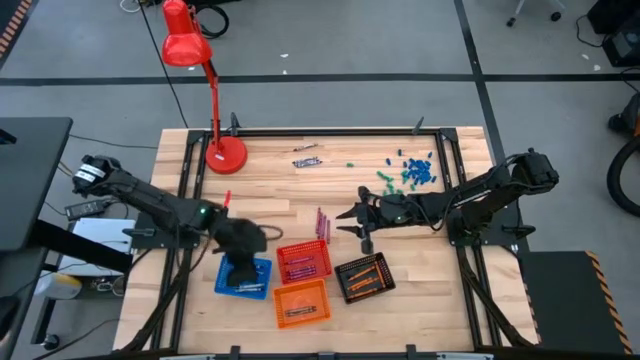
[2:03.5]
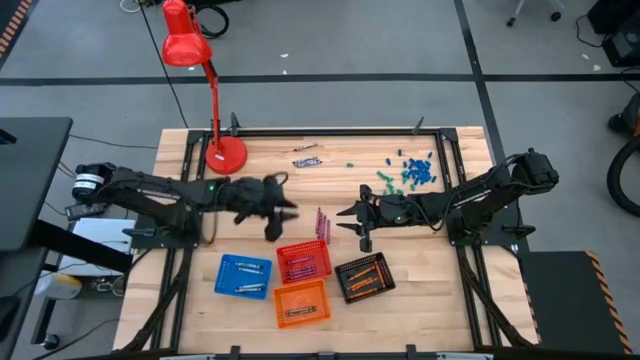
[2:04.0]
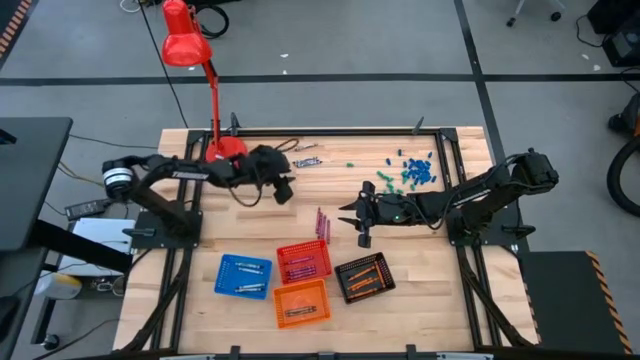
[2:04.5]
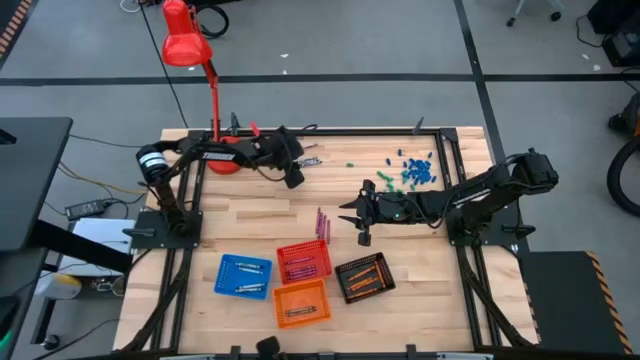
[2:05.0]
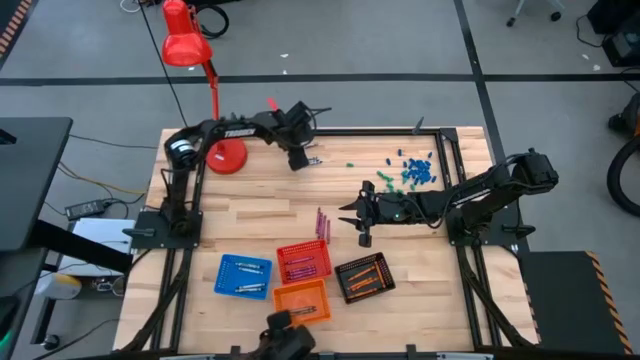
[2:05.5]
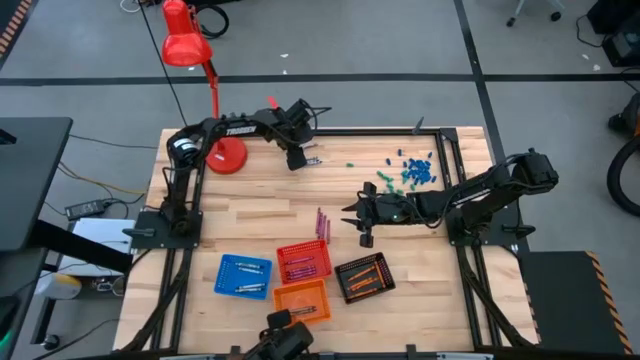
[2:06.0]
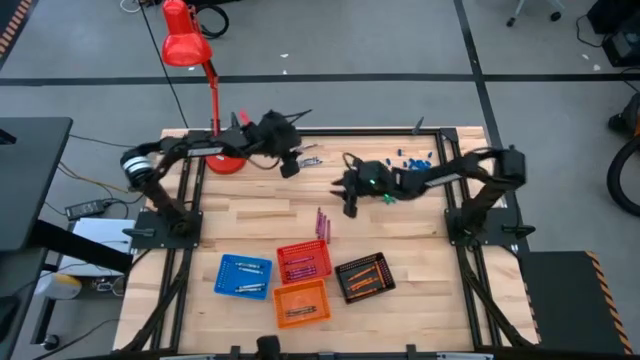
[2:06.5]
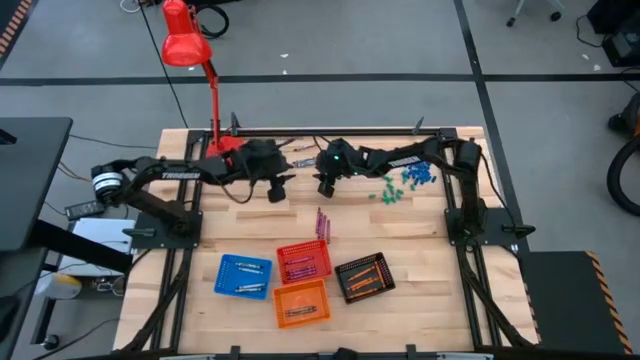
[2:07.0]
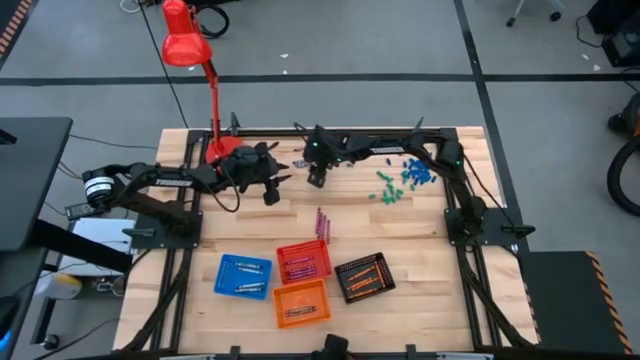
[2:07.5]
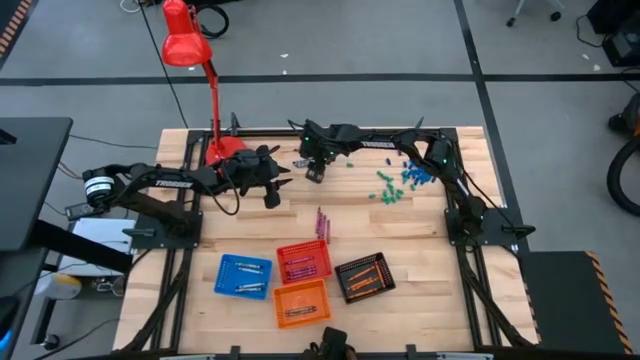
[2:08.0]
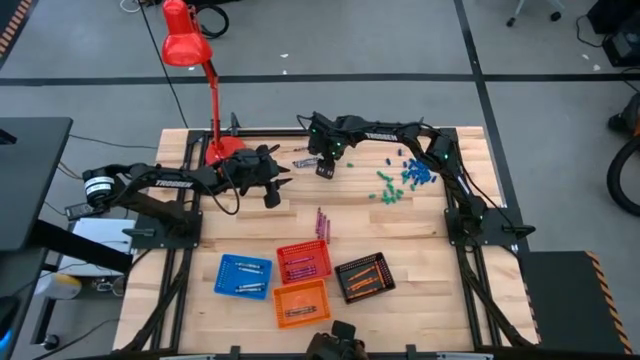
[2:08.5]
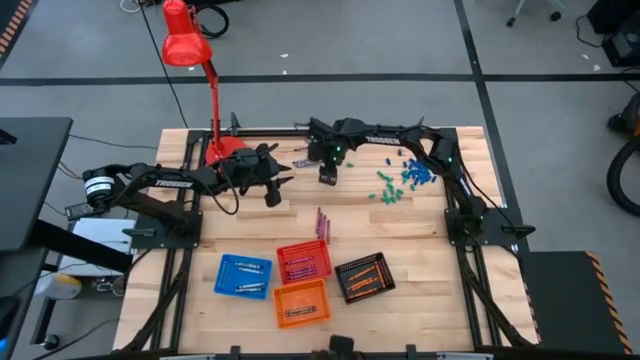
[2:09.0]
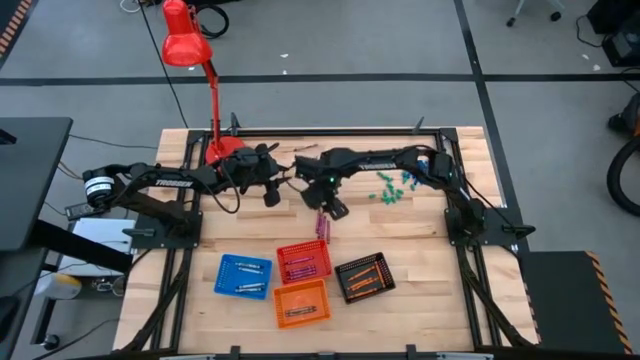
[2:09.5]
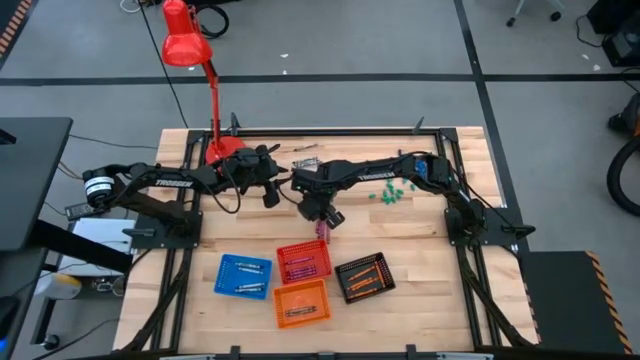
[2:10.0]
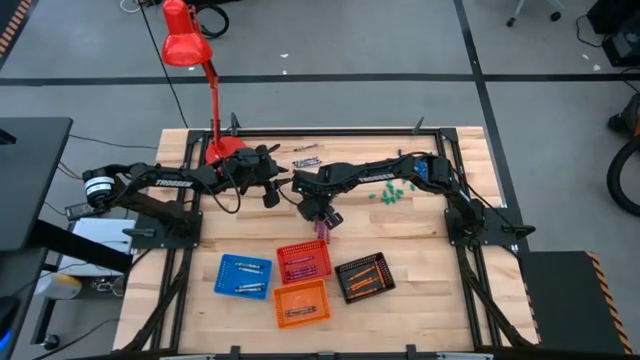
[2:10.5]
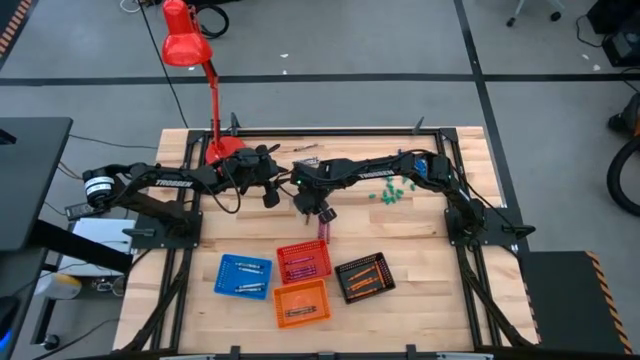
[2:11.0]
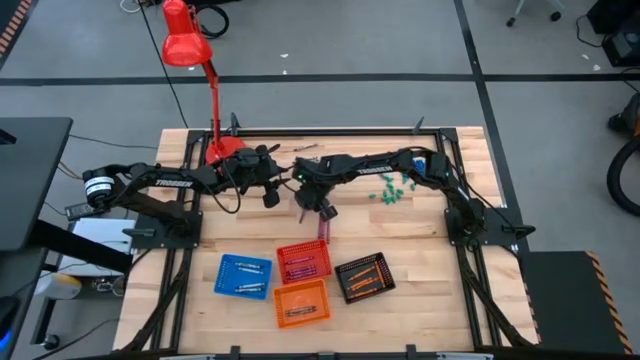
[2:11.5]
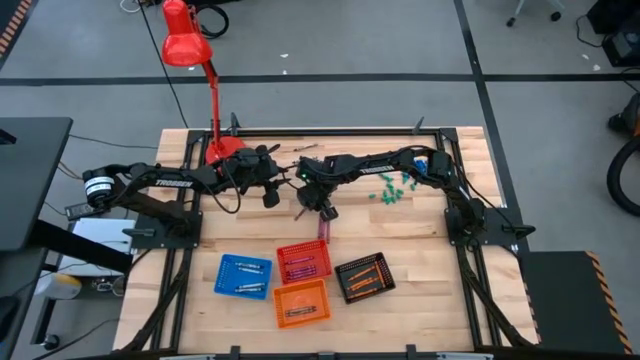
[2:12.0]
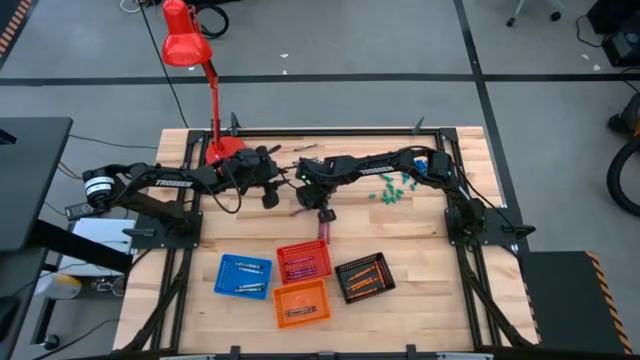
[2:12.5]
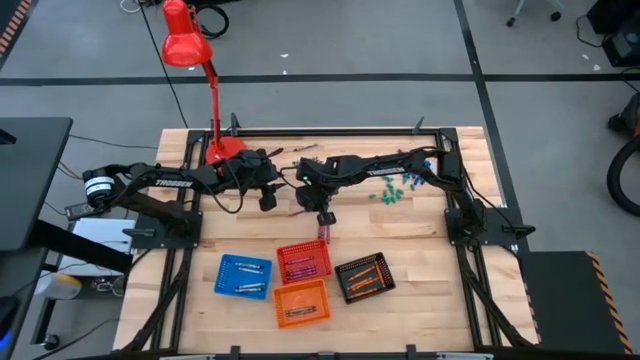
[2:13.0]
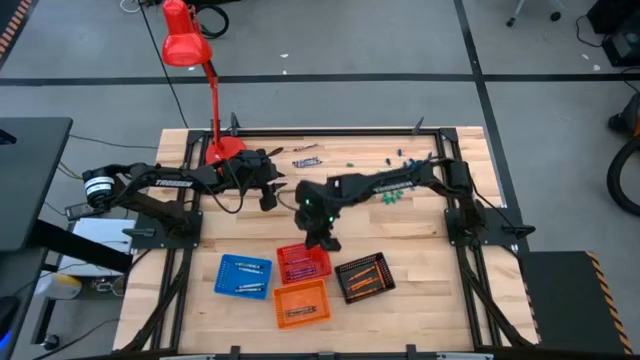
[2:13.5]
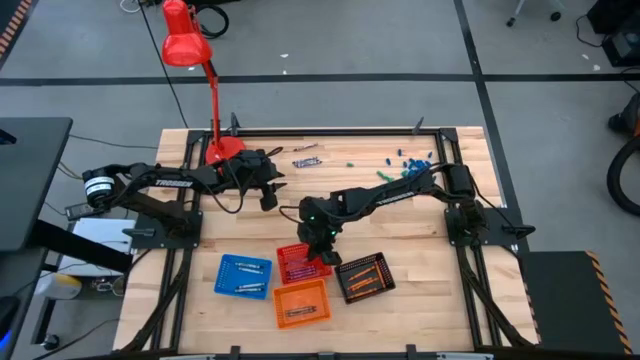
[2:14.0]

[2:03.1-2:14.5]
Task: Sort crayons
Put the violet crayon into the red bin

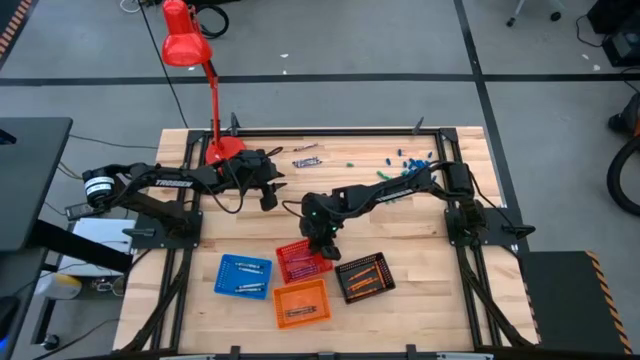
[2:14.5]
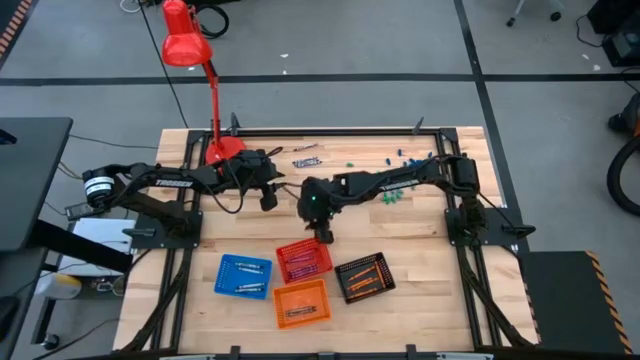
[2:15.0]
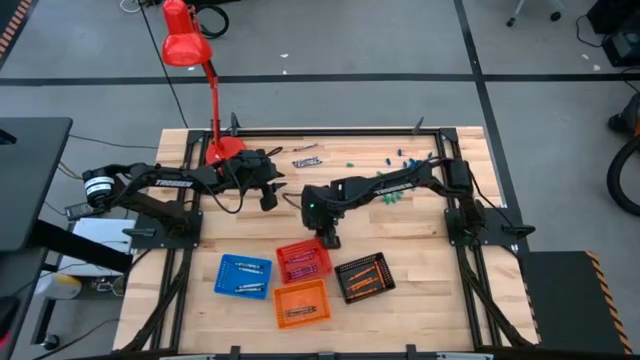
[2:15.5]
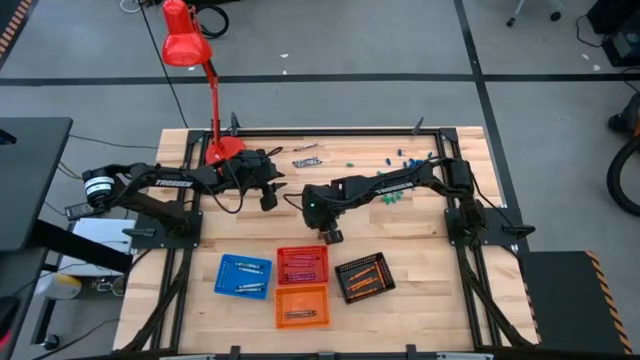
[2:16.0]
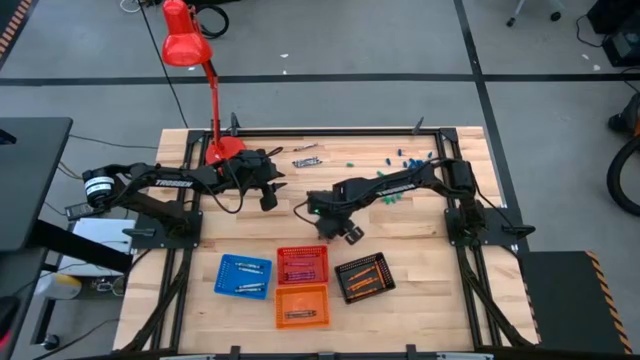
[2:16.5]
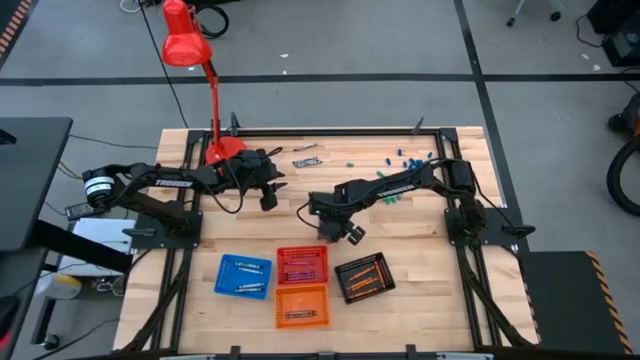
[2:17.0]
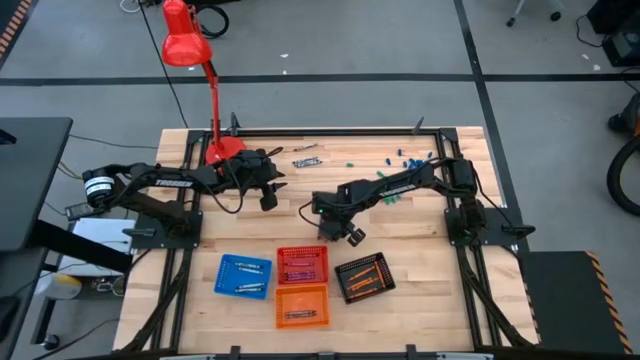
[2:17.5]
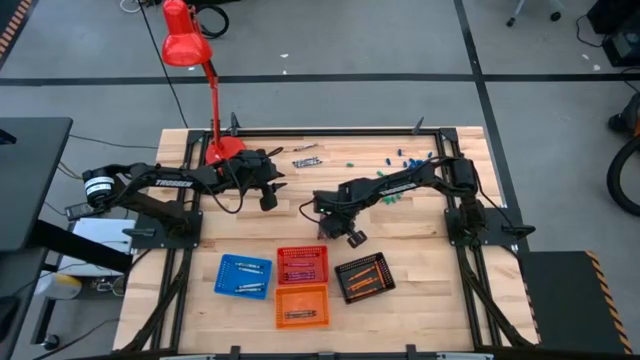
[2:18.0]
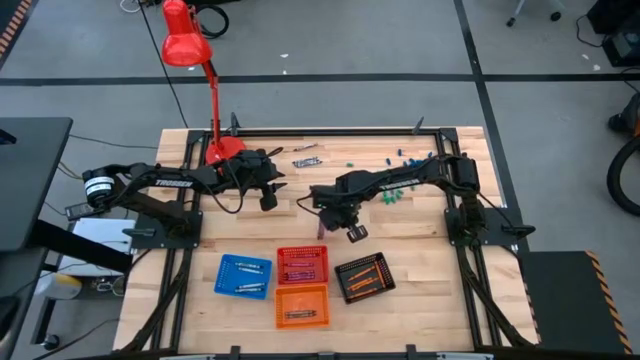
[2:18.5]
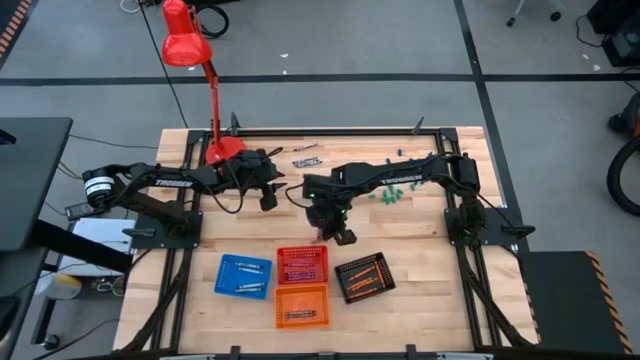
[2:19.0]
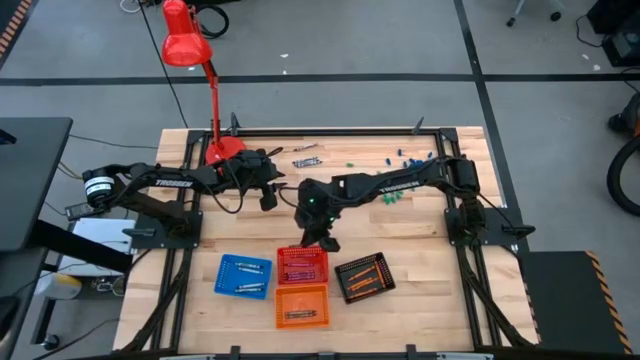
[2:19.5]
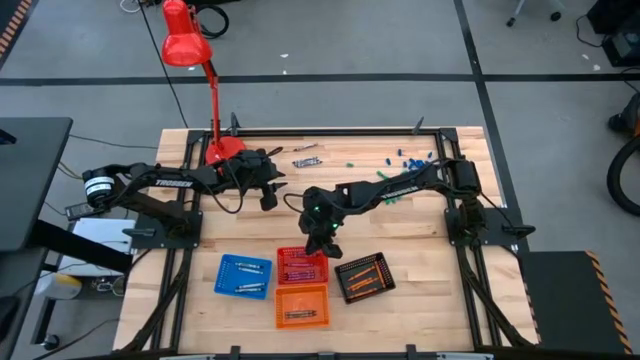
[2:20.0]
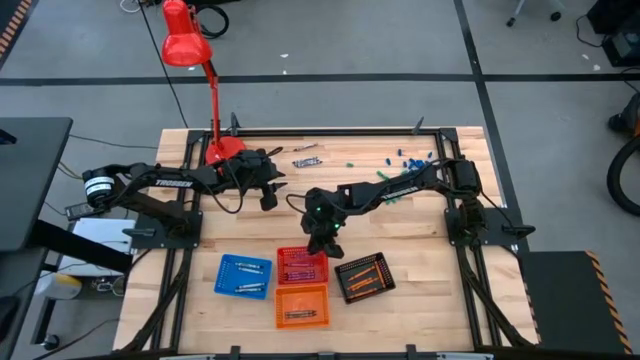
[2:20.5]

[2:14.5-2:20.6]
Put the violet crayon into the red bin

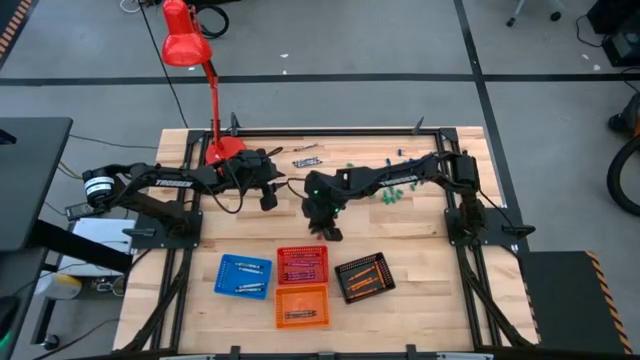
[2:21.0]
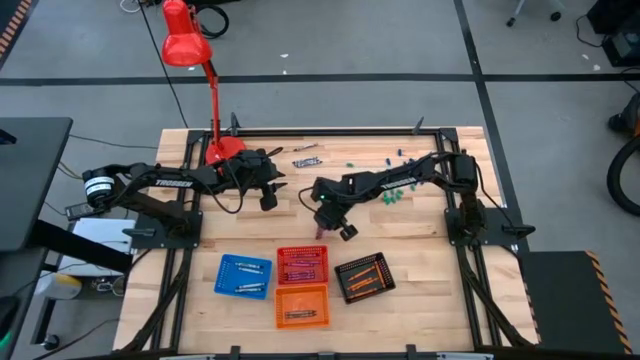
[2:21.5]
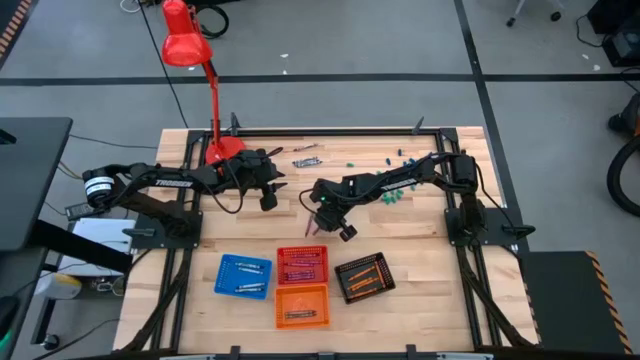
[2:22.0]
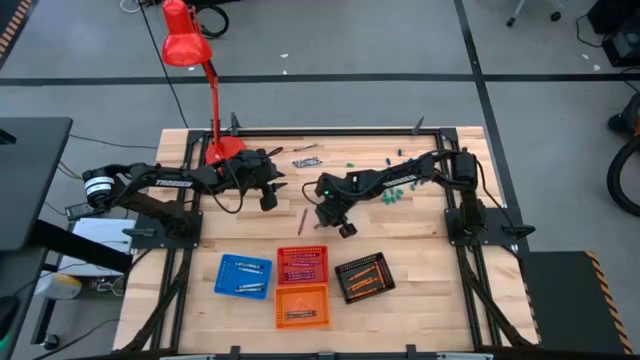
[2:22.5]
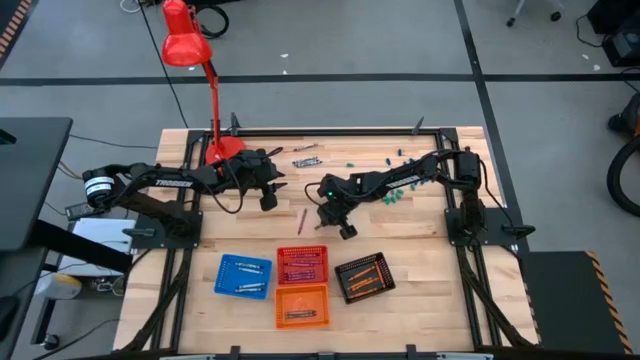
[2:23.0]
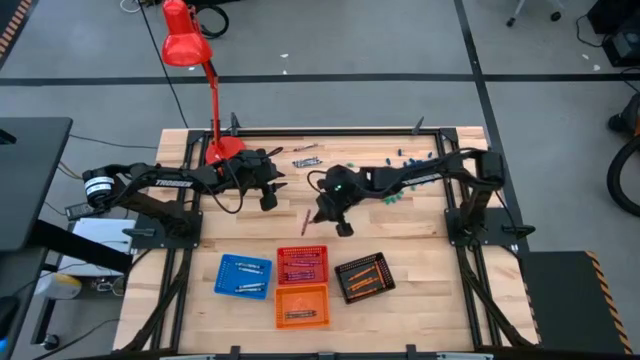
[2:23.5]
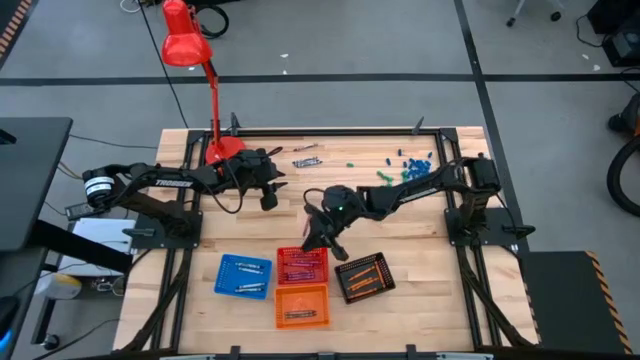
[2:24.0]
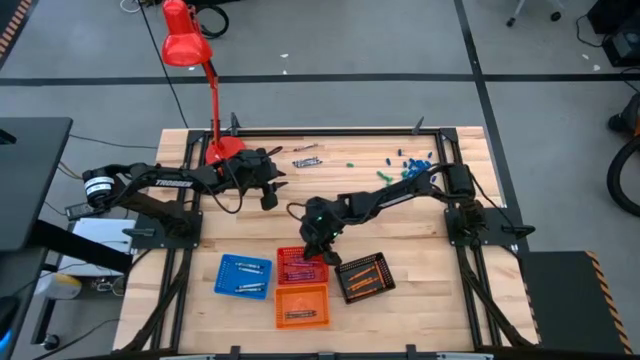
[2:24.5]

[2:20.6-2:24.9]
Put the violet crayon into the red bin
